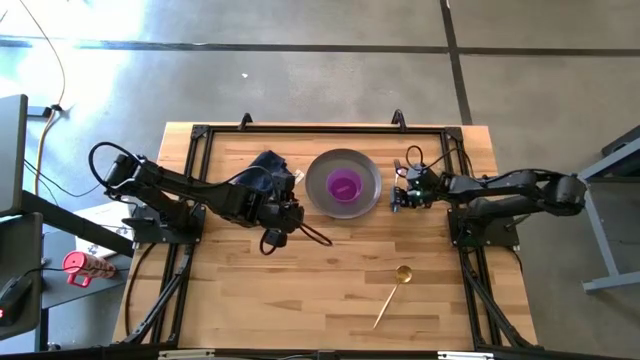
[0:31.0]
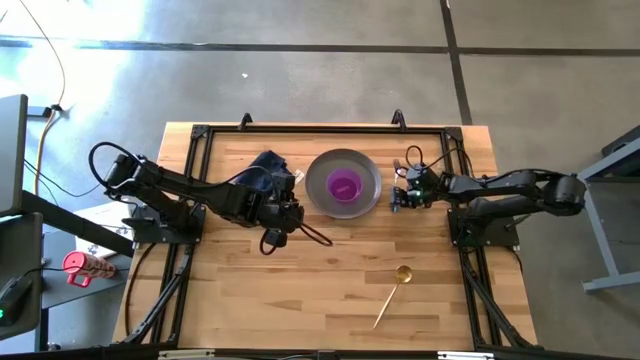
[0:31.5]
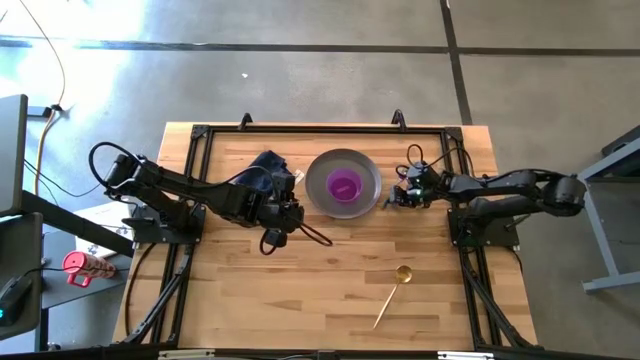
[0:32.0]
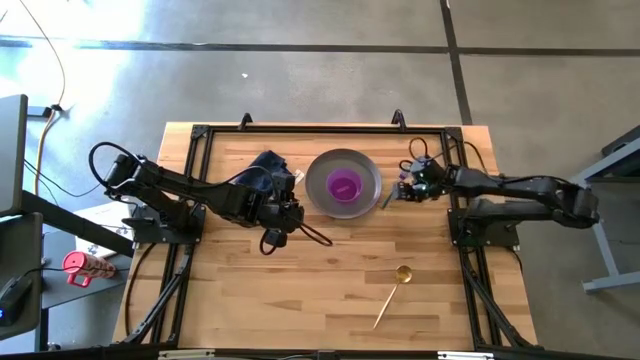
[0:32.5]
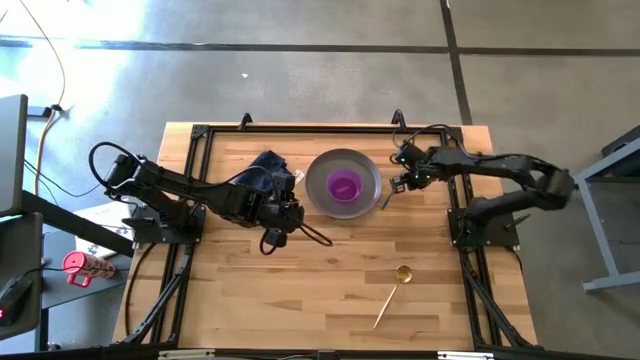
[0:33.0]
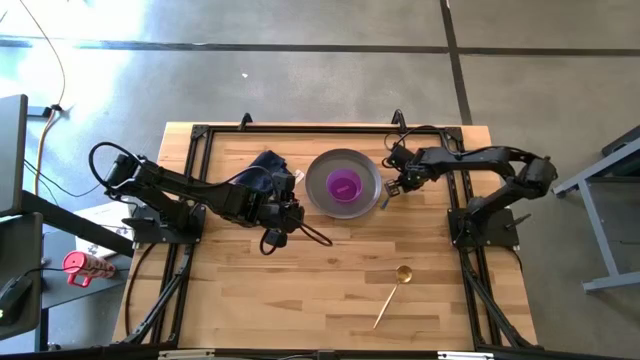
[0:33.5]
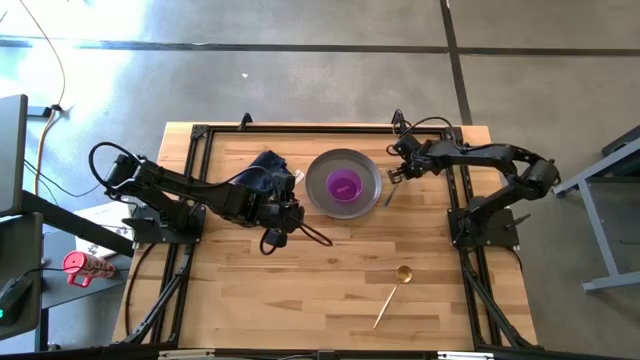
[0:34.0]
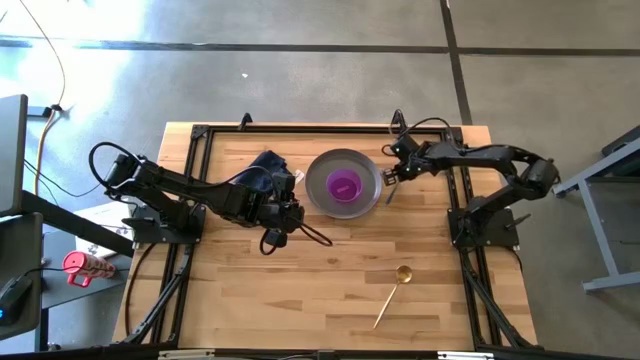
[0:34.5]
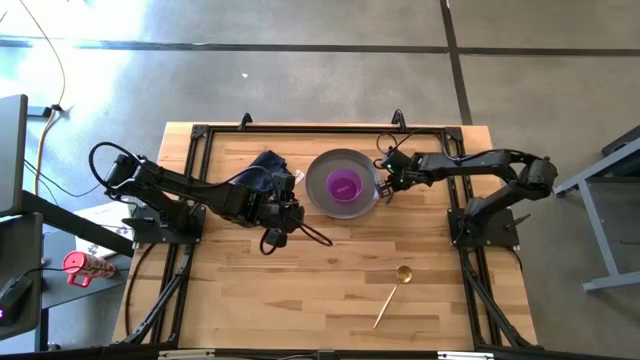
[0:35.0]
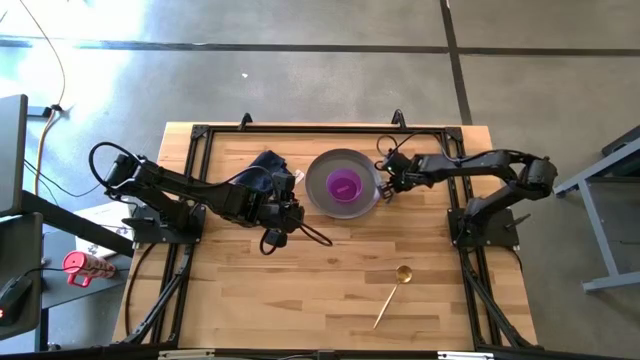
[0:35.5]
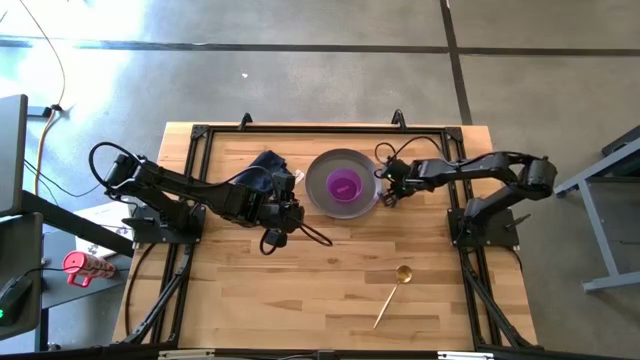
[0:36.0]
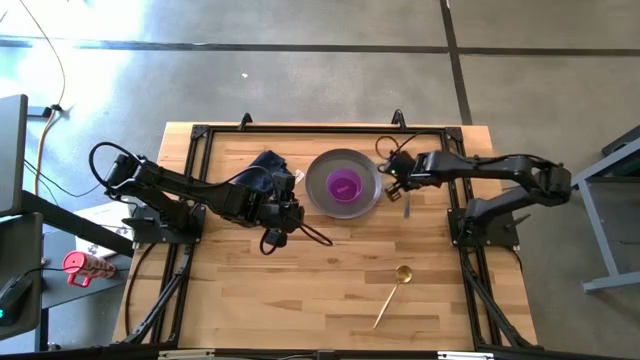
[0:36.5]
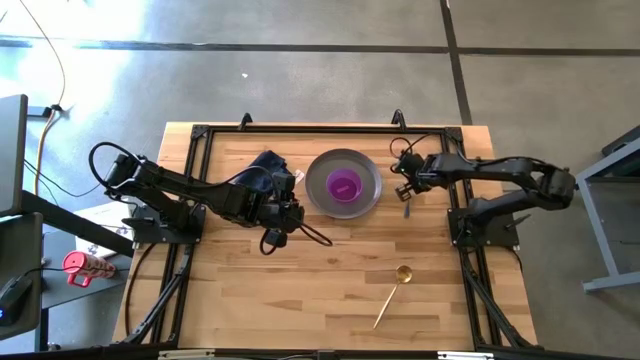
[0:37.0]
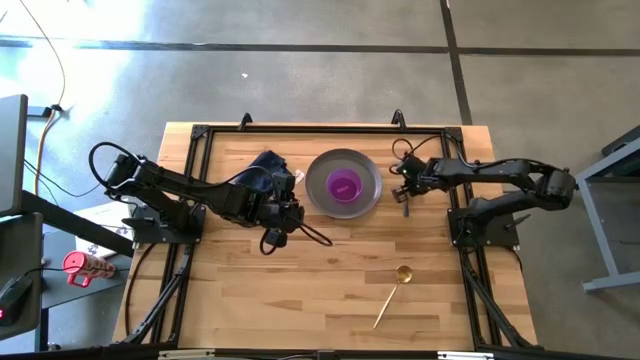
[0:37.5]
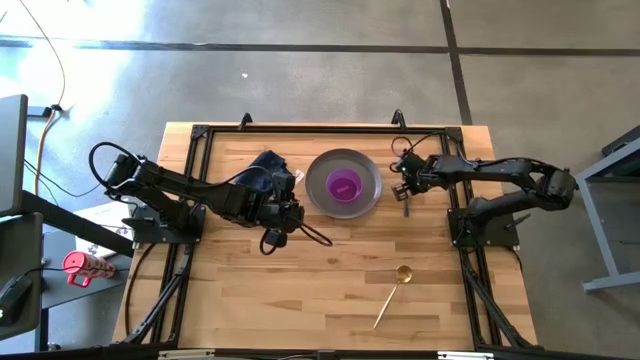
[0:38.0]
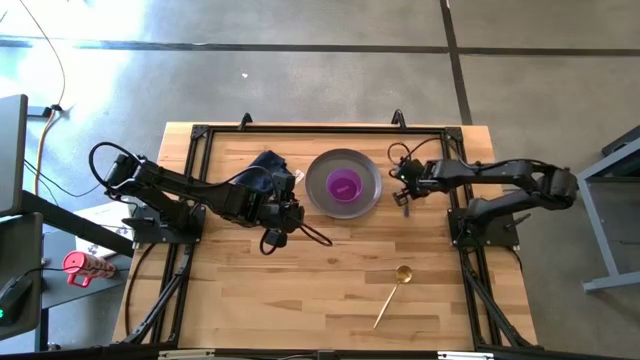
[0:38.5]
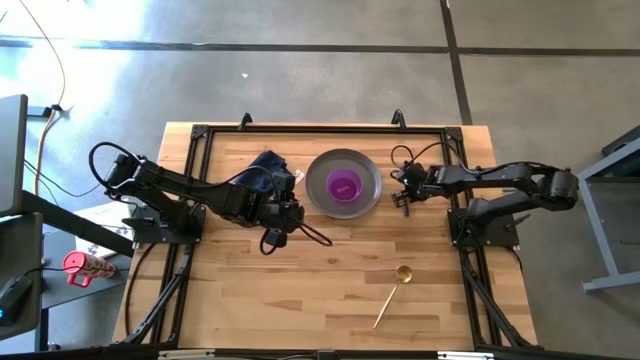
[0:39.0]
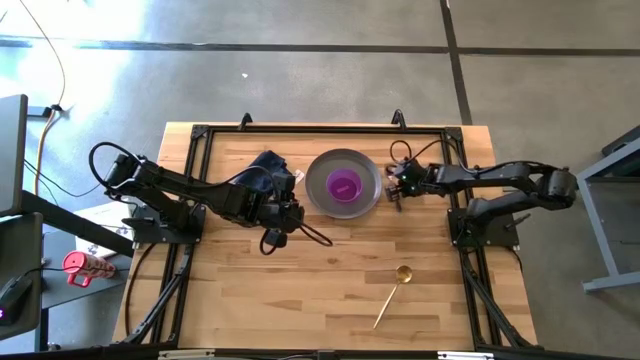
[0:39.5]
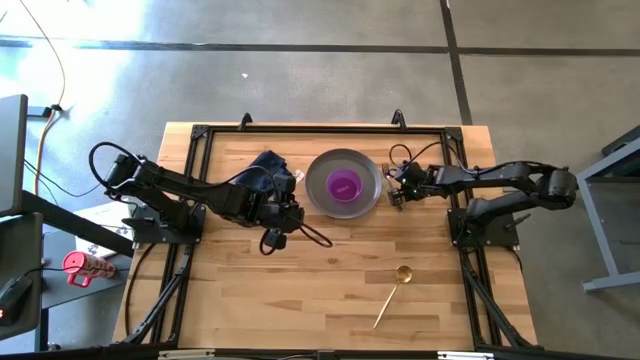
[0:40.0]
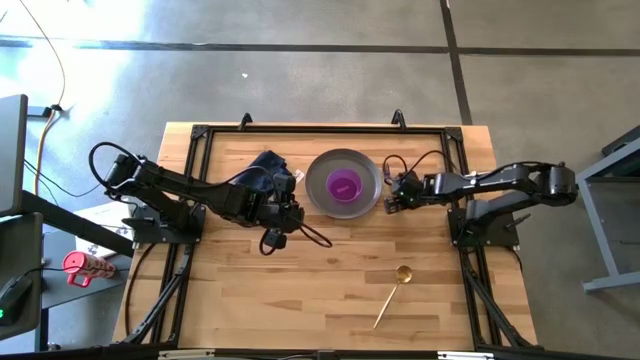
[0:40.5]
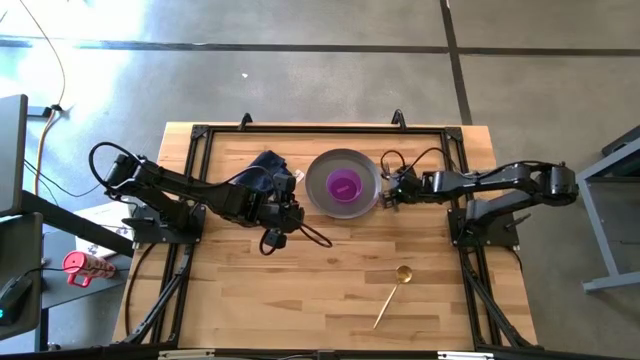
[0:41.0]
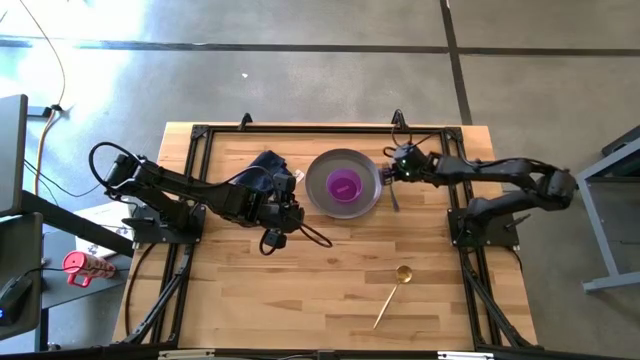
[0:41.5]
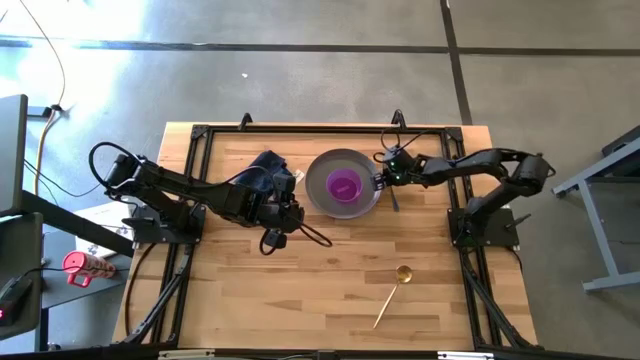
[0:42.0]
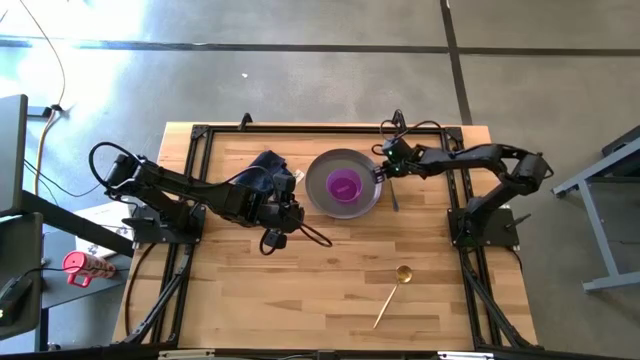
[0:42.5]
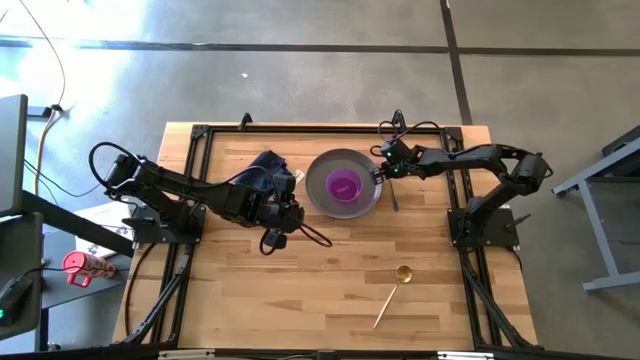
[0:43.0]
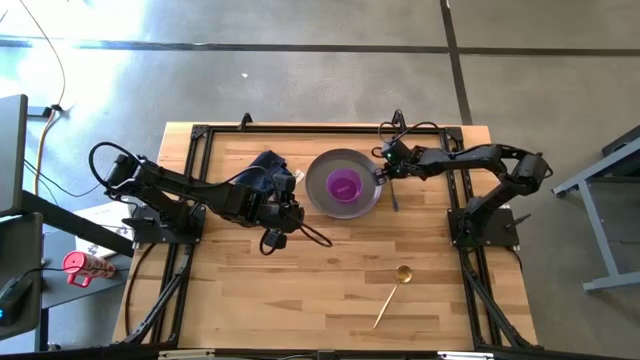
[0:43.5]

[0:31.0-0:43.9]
Task: Set table place
Put the blue fork to the right of the gray plate

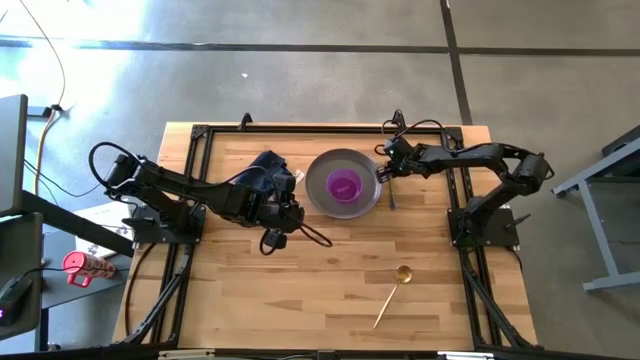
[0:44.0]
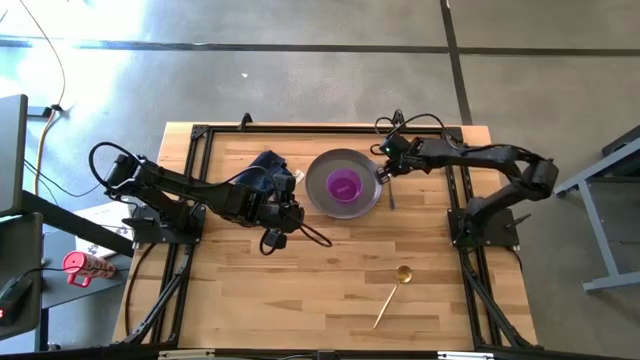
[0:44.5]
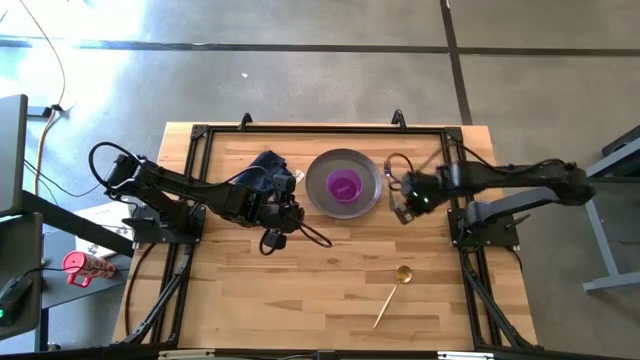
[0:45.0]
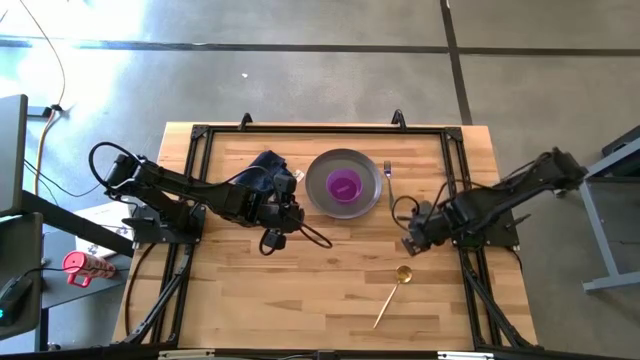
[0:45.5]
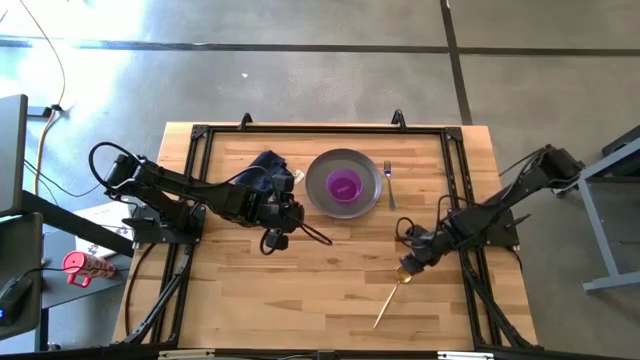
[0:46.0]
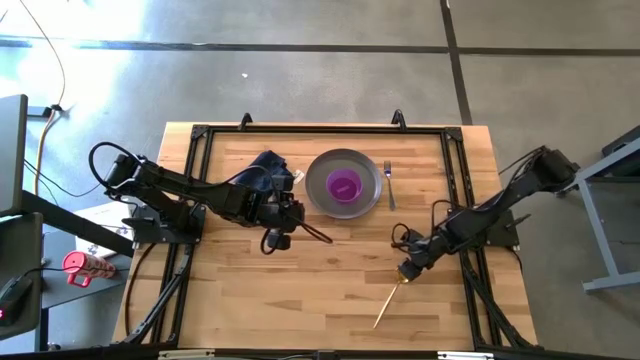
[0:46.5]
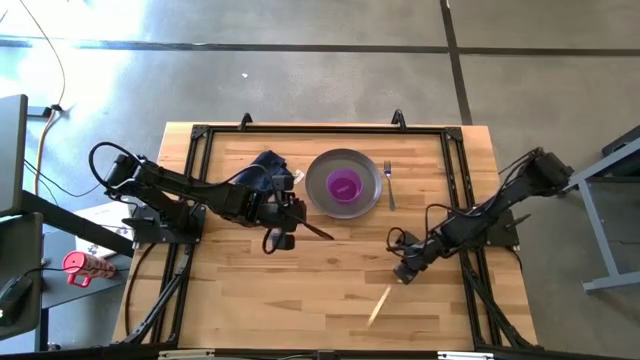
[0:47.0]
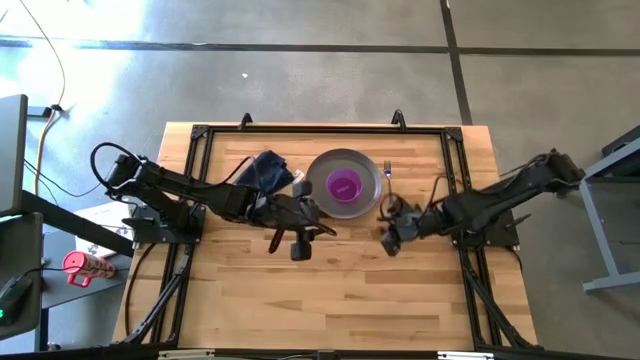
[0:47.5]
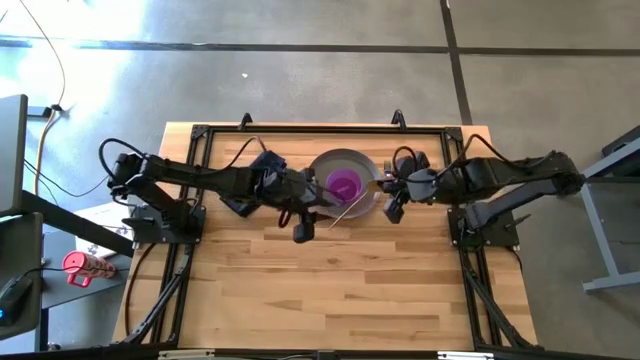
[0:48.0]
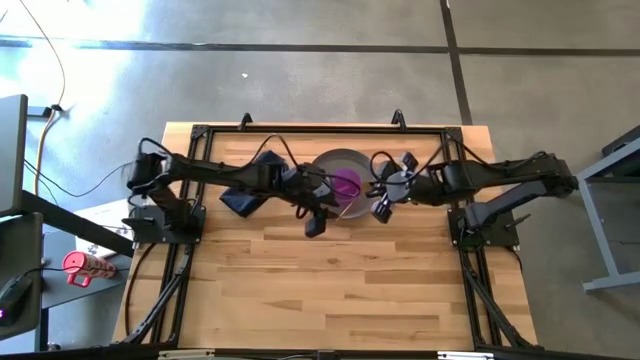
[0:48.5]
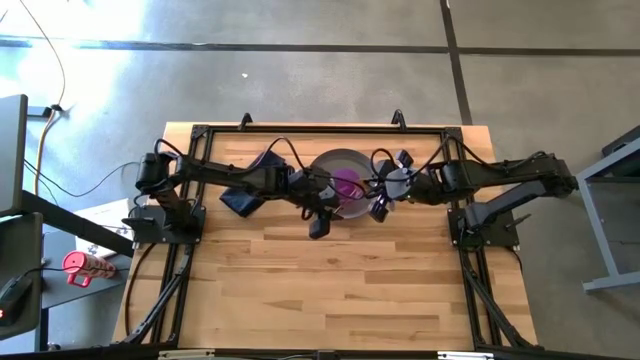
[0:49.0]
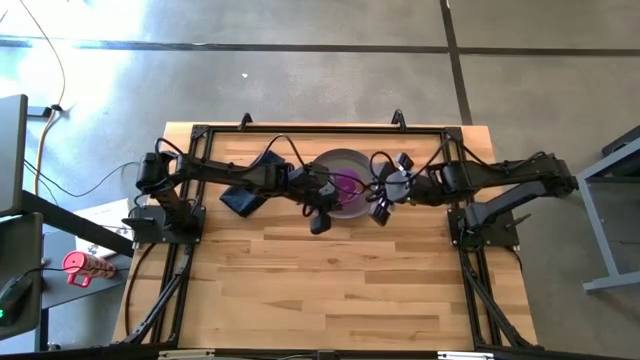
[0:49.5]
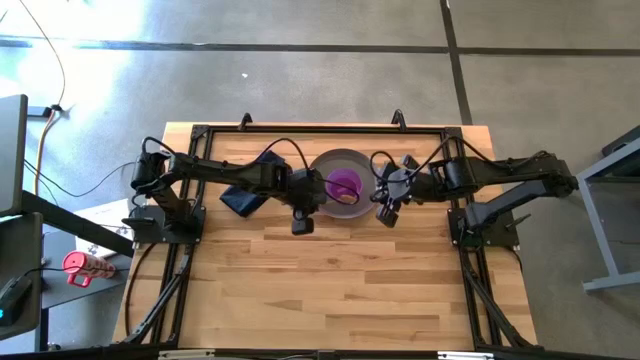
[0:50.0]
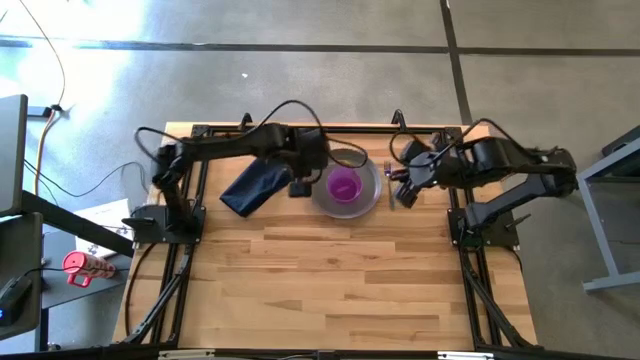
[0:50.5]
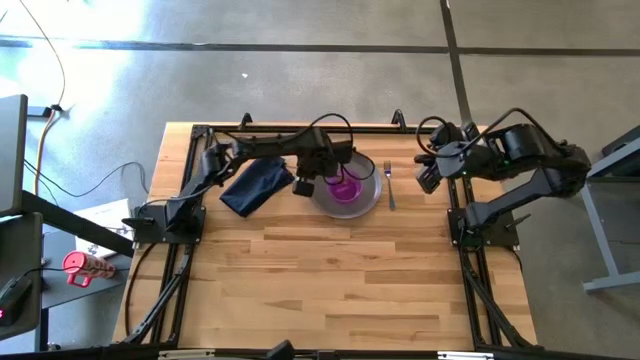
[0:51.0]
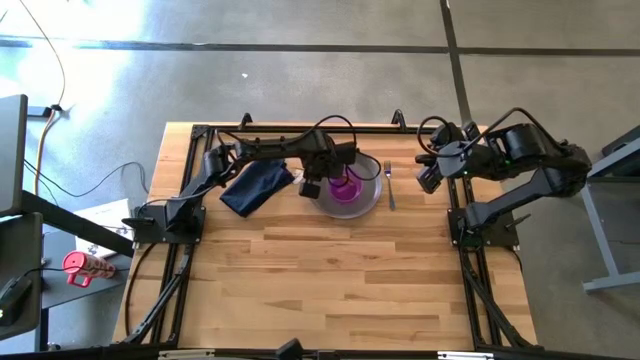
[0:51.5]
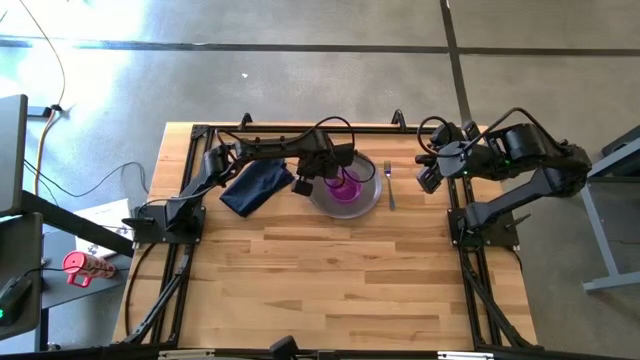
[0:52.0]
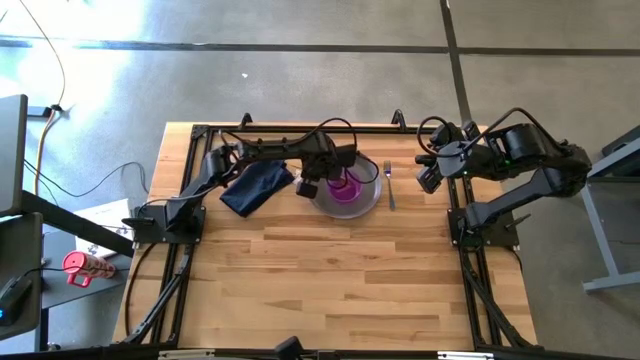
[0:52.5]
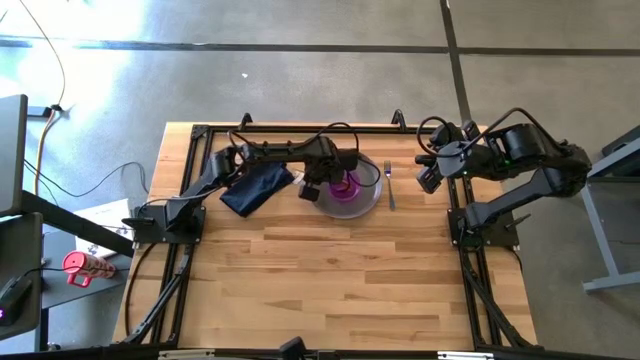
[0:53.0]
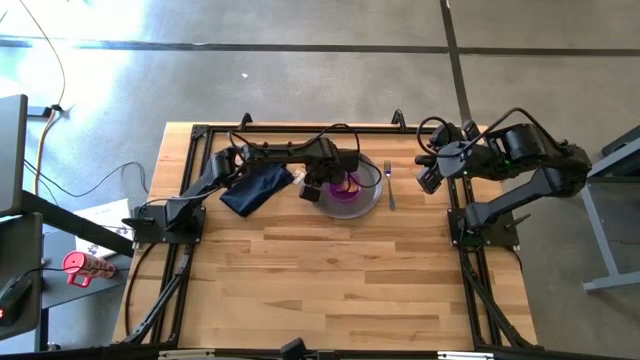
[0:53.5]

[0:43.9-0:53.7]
Put the golden spoon into the purple bowl
